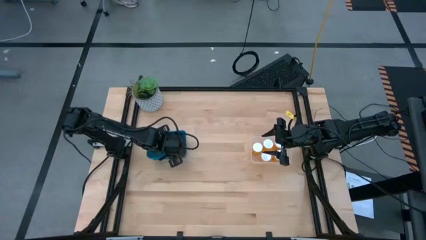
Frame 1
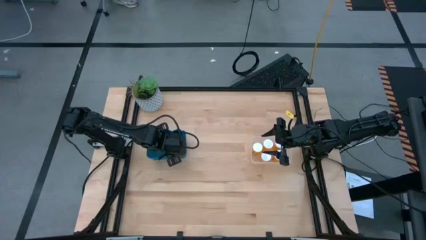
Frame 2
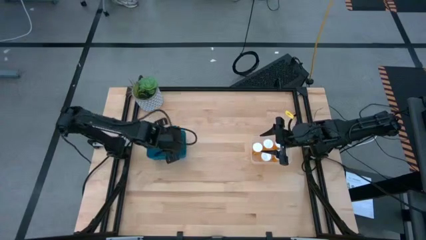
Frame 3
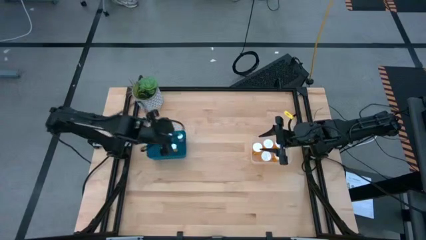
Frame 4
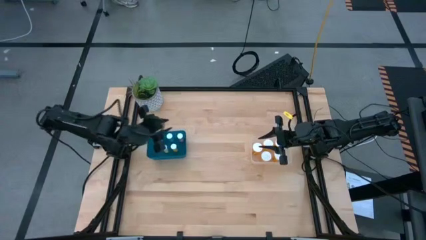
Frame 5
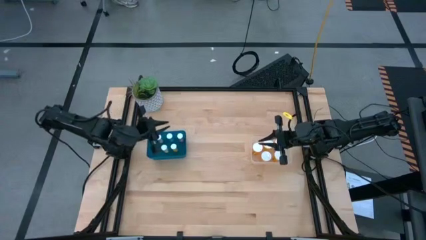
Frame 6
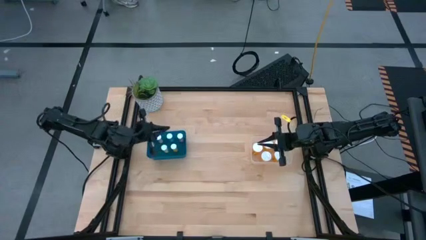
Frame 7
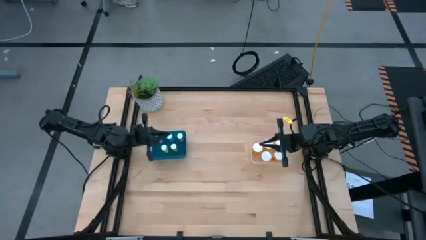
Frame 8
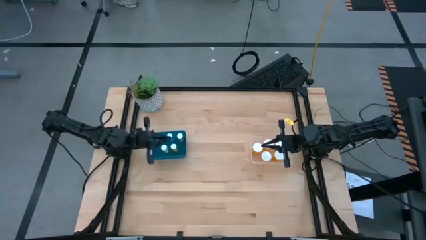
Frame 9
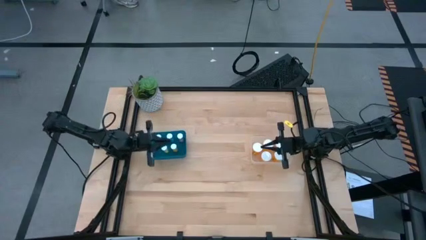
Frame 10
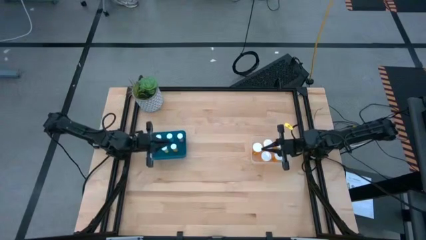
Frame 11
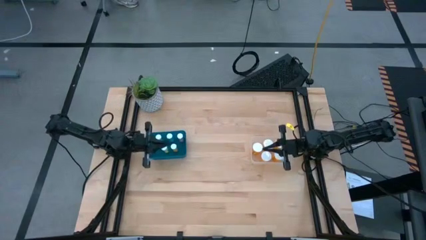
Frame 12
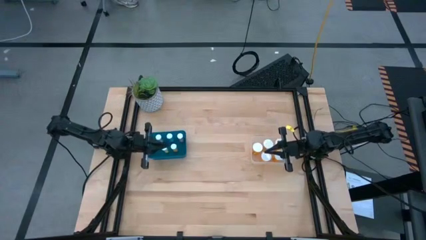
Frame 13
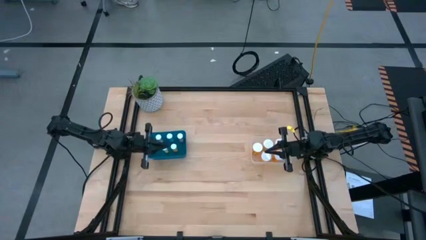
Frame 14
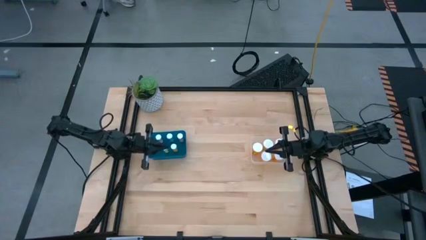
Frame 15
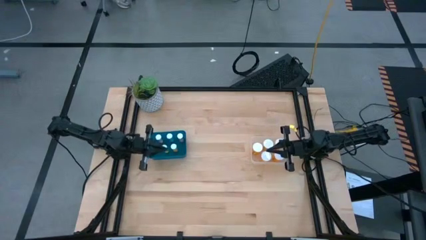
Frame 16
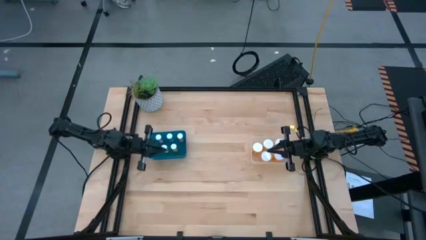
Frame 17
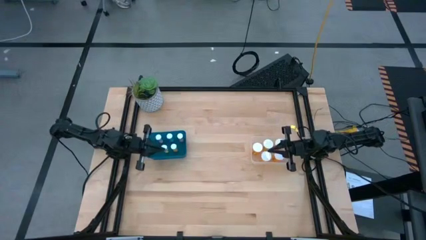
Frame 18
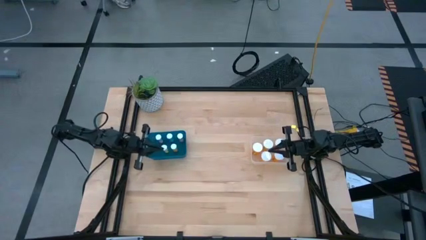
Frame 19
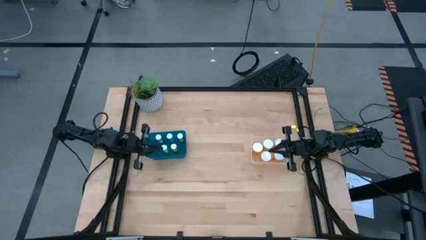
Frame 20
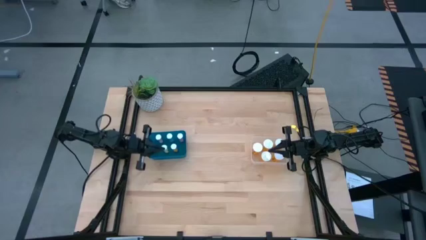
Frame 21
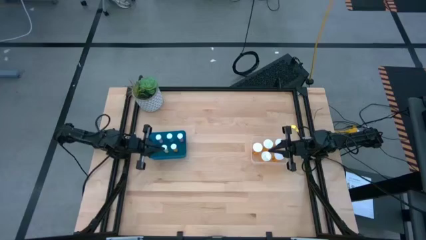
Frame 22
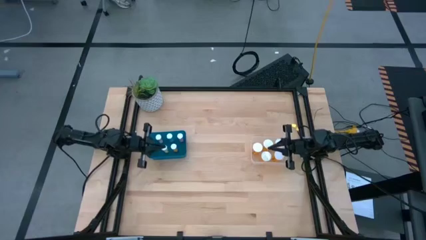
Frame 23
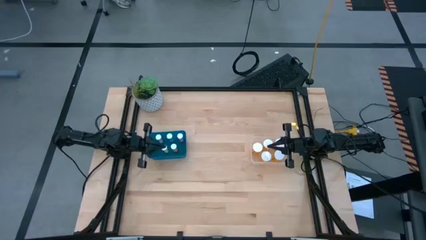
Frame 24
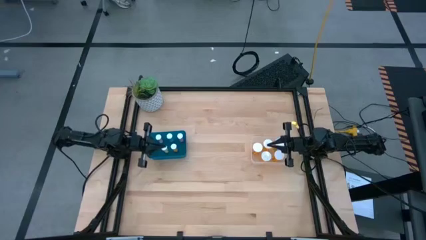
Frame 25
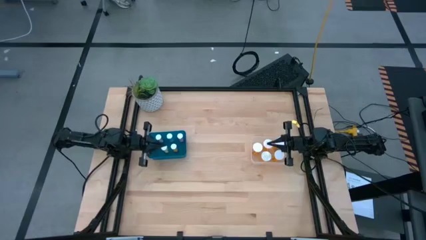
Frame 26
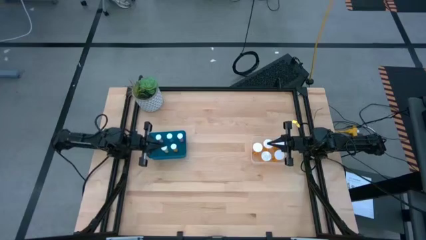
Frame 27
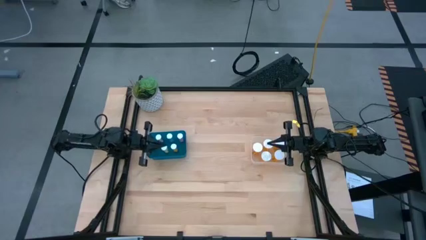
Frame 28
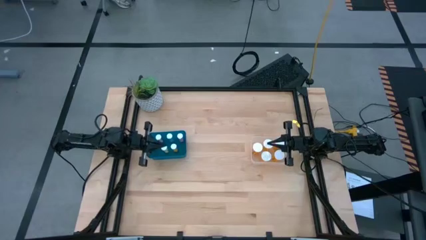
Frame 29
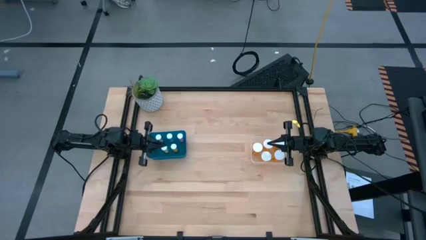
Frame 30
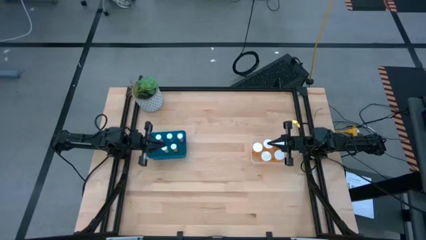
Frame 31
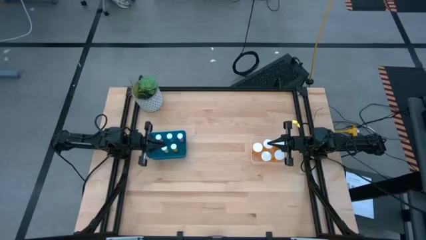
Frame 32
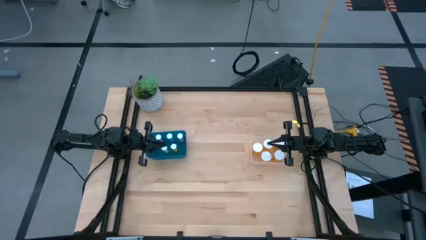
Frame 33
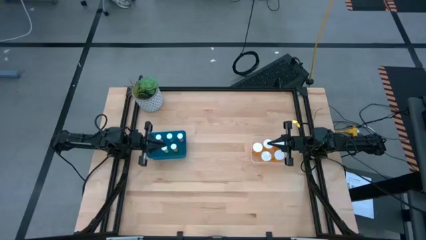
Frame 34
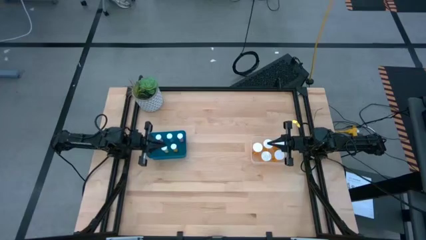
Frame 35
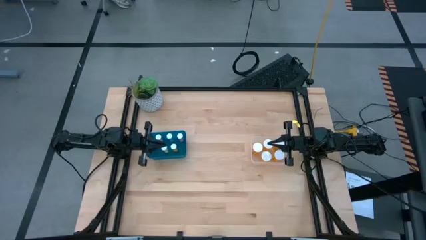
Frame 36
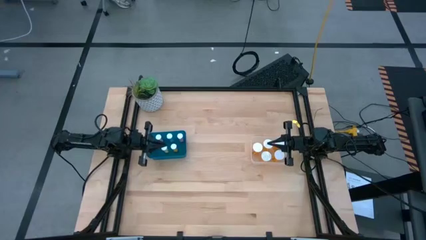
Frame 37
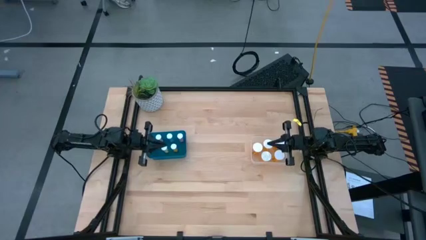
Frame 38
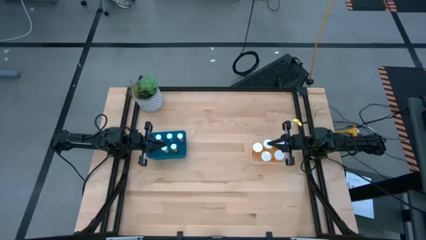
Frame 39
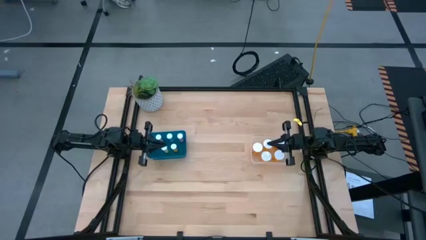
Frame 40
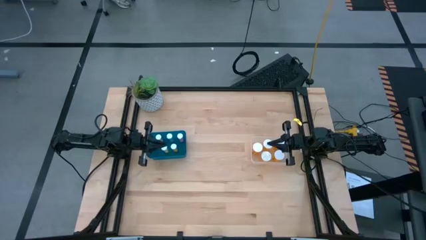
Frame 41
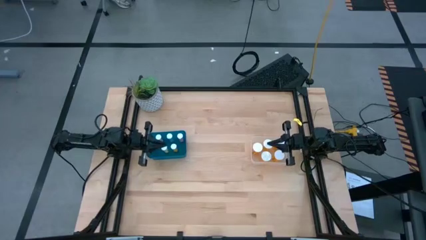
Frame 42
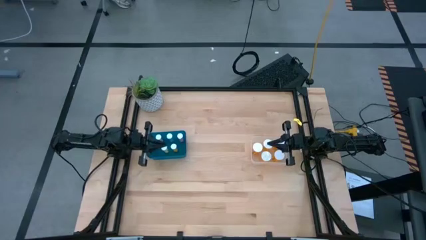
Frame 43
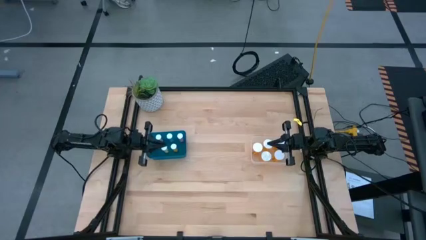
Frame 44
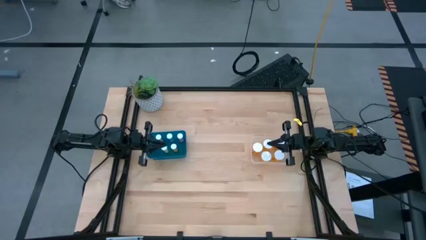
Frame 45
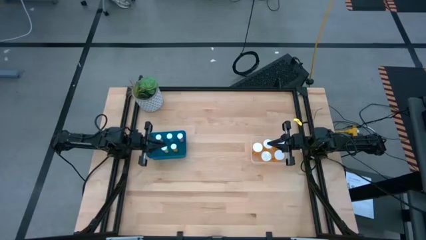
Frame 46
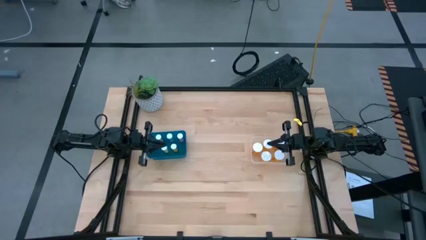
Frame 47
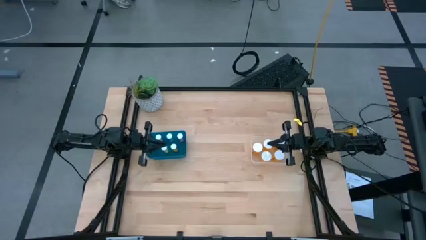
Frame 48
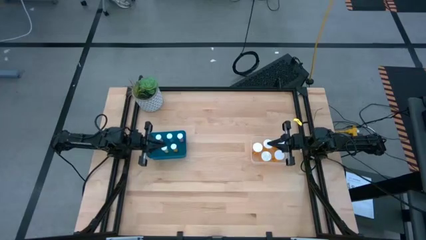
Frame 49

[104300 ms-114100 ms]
Task: Pick and place medicine bottles into bin by pill shape (circle, oval)
Return to Home Position

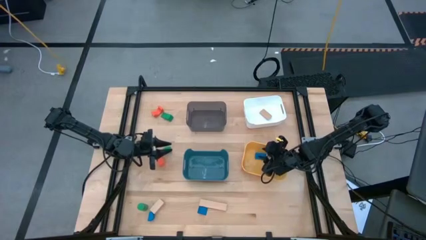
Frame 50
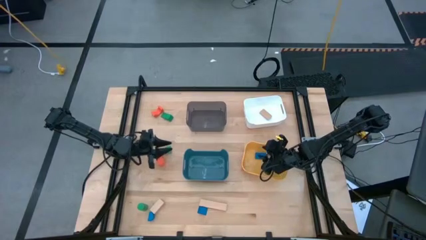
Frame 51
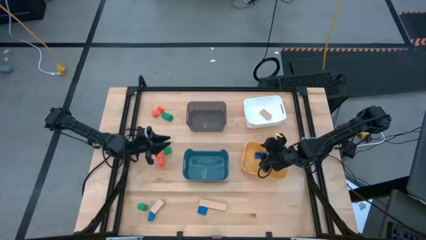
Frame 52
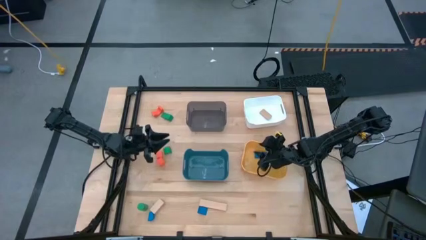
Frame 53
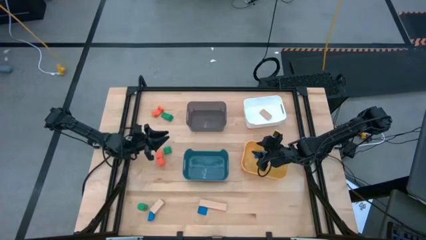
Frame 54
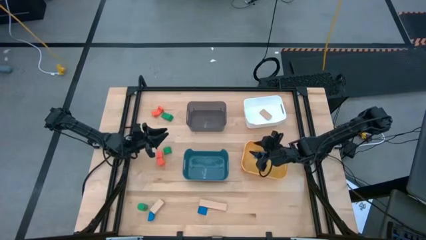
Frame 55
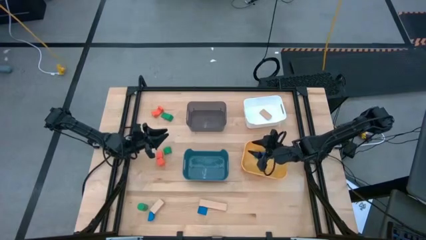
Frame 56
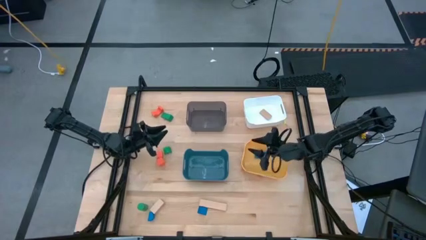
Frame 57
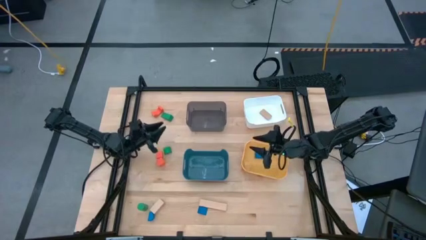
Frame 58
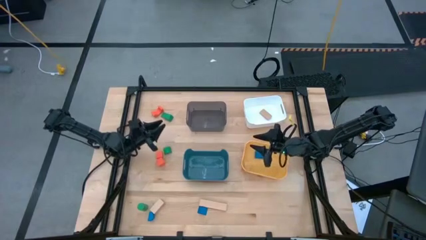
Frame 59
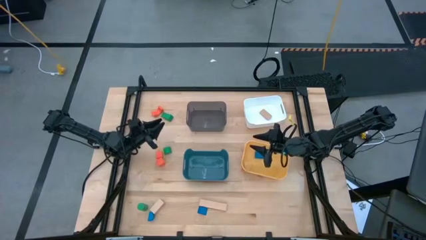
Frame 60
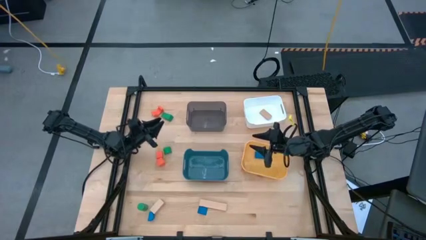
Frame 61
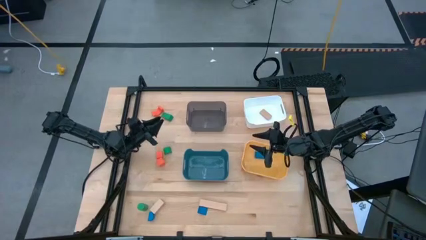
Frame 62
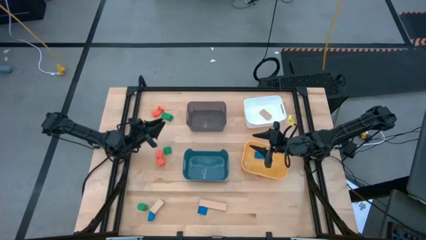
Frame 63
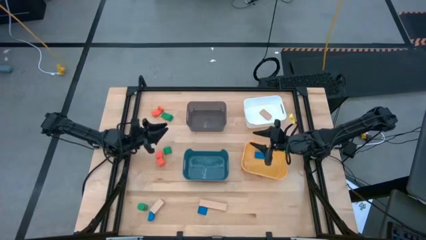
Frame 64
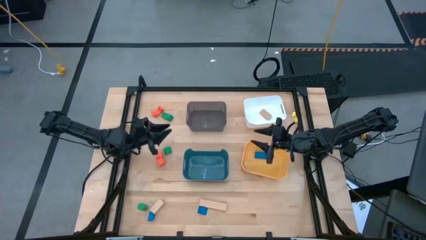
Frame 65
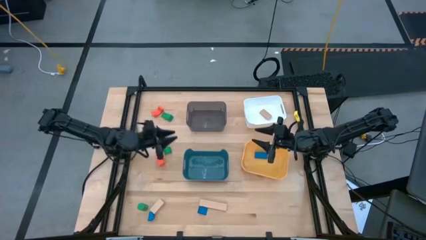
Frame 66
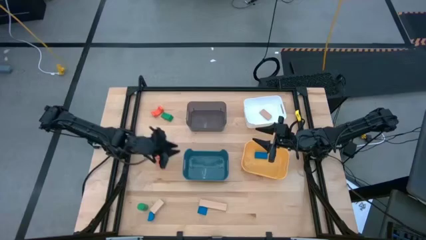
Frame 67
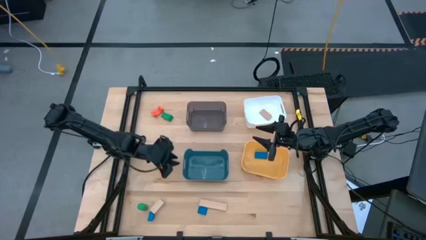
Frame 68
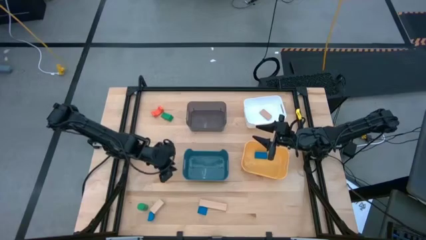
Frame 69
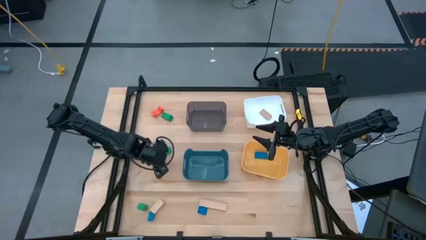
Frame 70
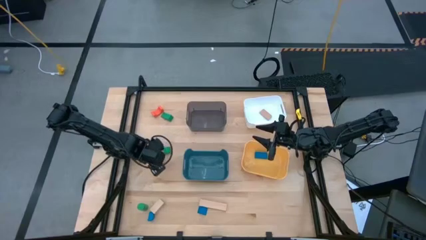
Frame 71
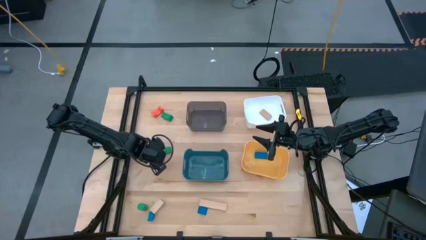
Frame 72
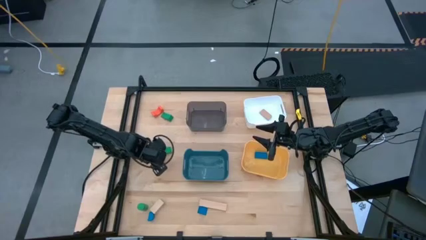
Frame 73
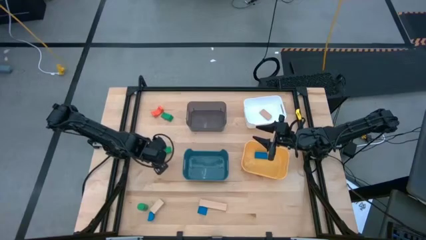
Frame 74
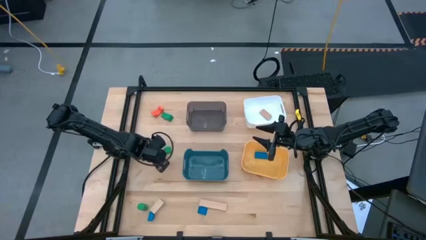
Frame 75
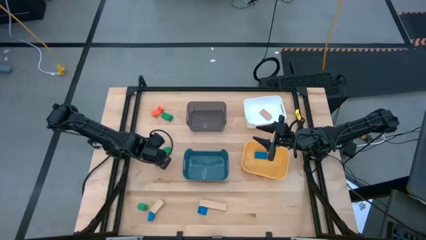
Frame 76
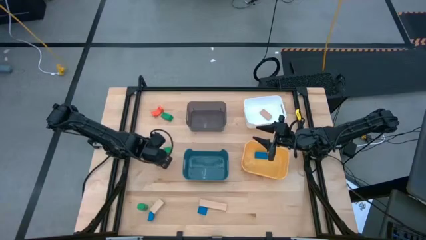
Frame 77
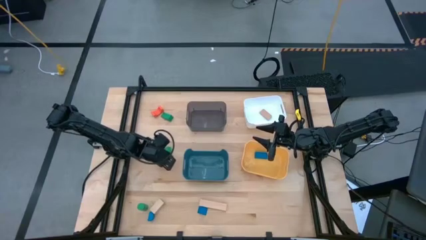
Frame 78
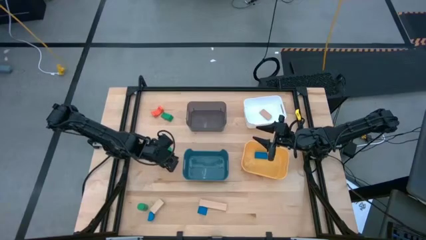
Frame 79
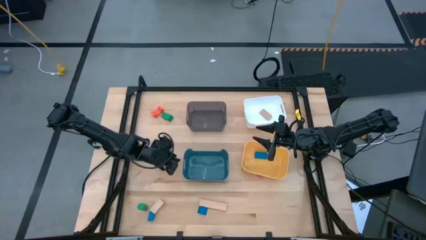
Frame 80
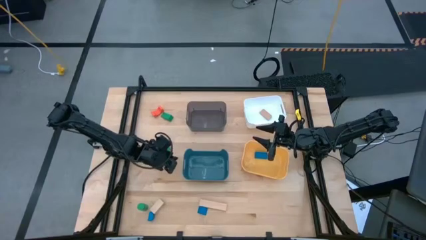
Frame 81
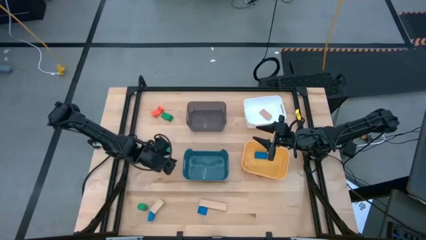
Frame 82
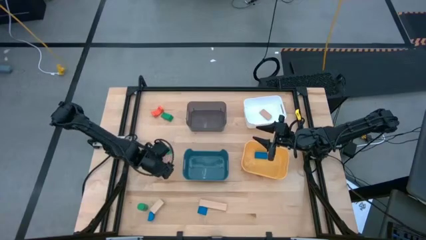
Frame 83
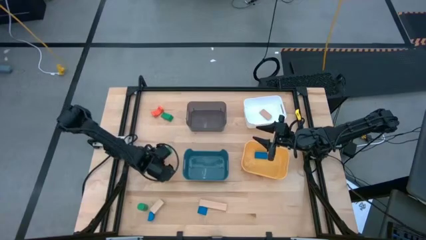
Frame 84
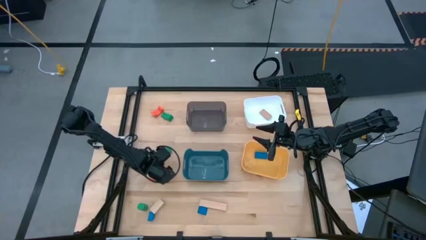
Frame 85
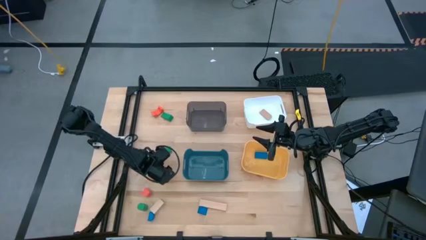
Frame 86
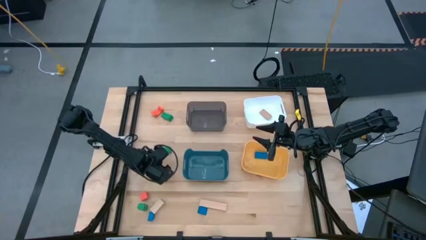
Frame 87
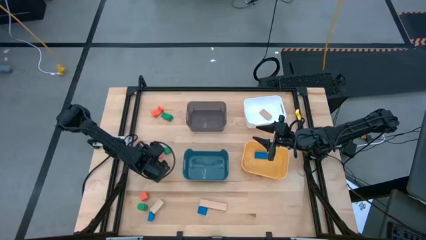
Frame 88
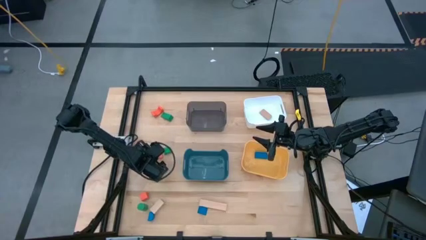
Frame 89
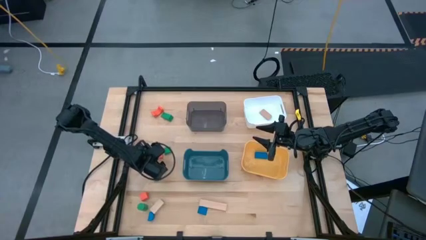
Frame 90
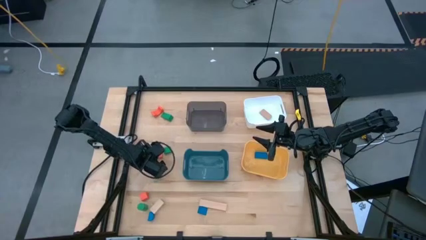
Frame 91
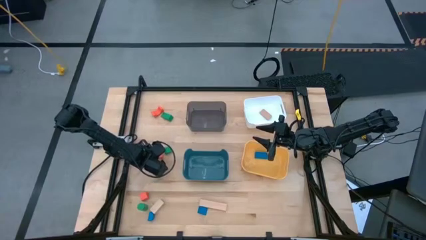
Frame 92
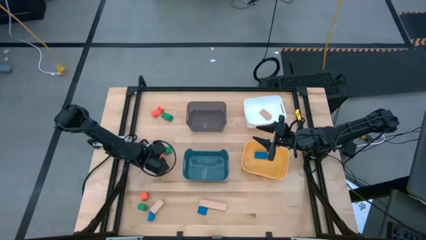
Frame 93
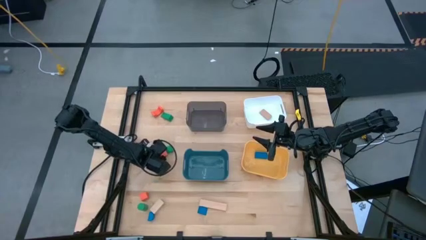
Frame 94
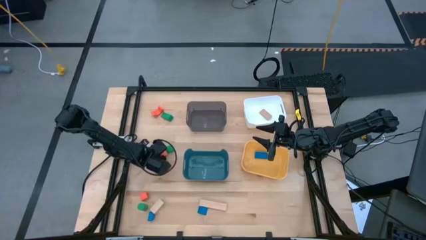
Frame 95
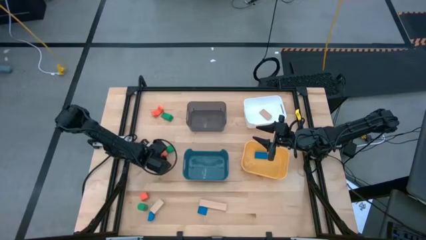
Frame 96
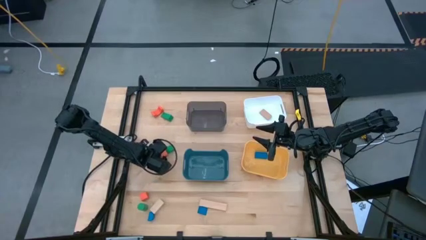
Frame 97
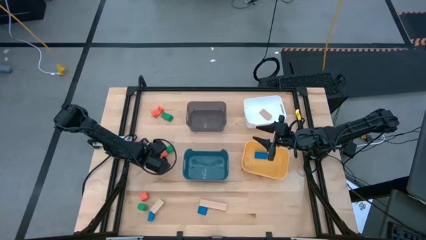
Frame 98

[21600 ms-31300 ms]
Task: Sort & place blocks by color
Put the middle orange block into the transparent black bin
